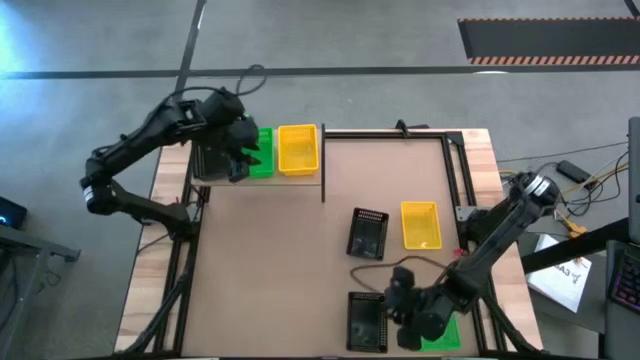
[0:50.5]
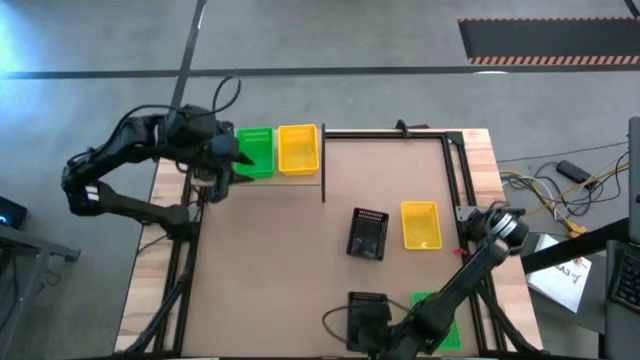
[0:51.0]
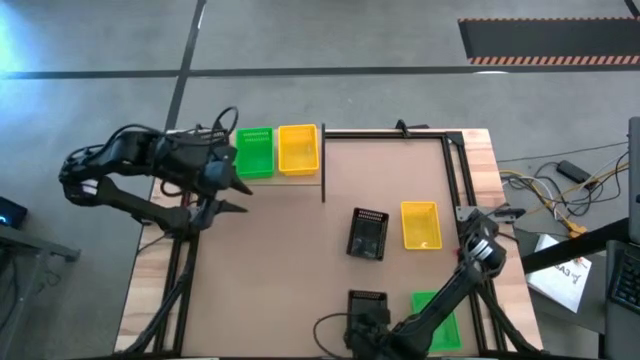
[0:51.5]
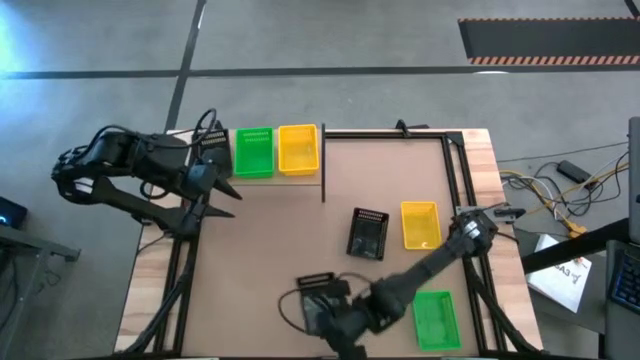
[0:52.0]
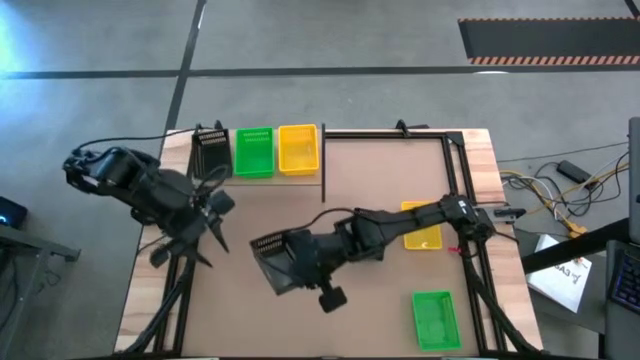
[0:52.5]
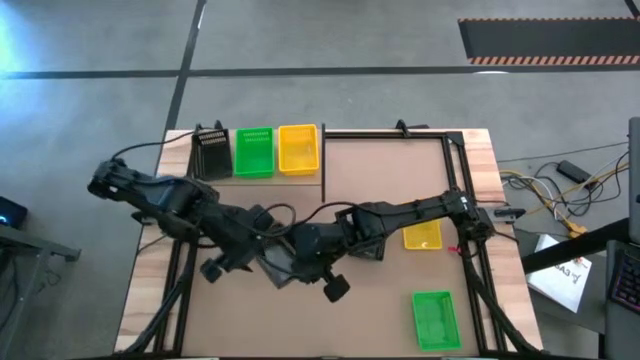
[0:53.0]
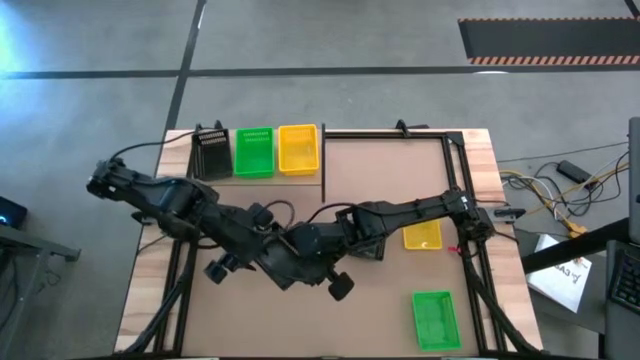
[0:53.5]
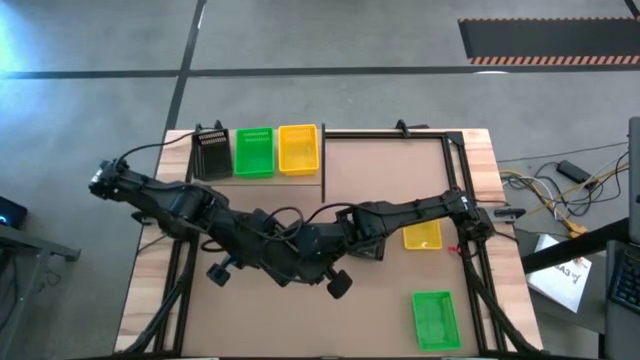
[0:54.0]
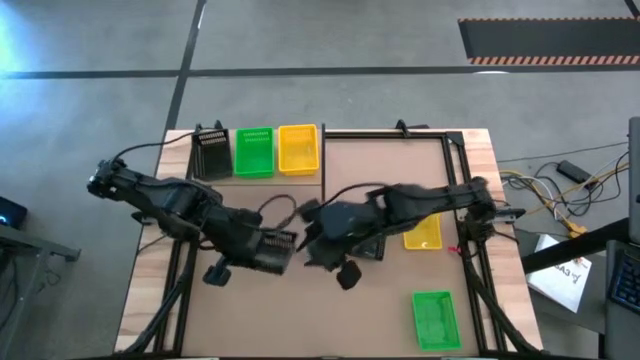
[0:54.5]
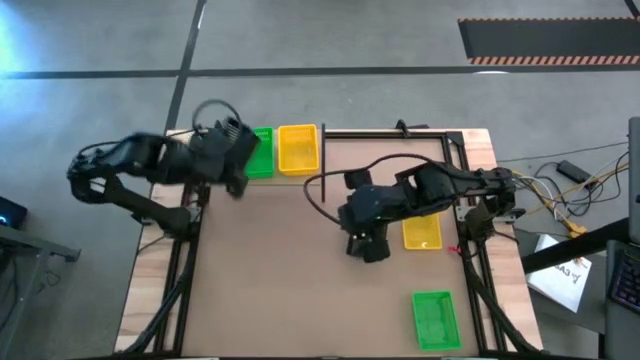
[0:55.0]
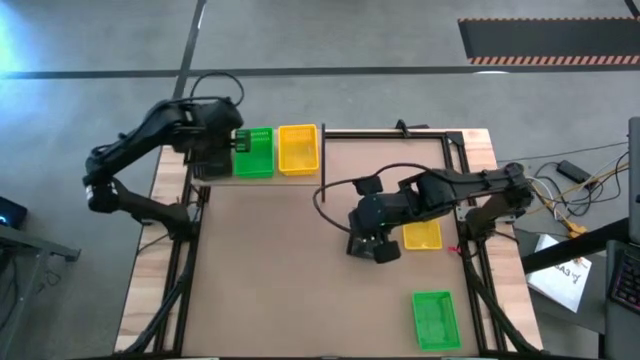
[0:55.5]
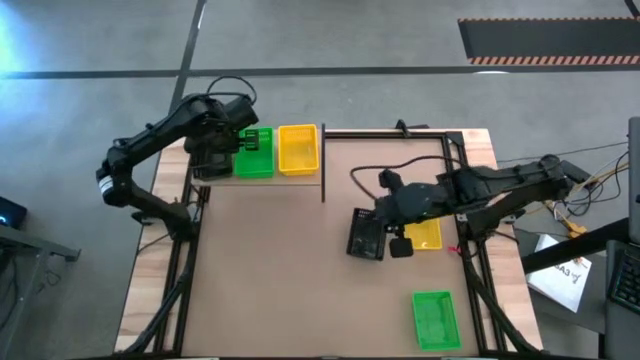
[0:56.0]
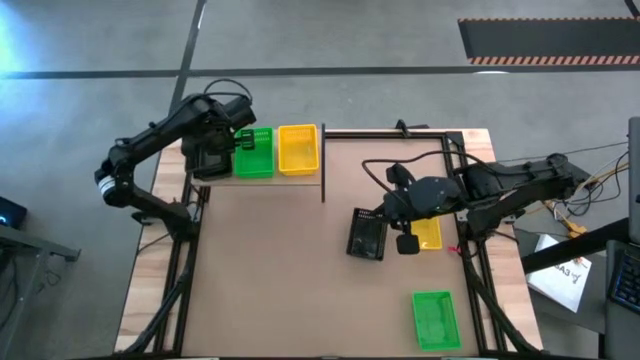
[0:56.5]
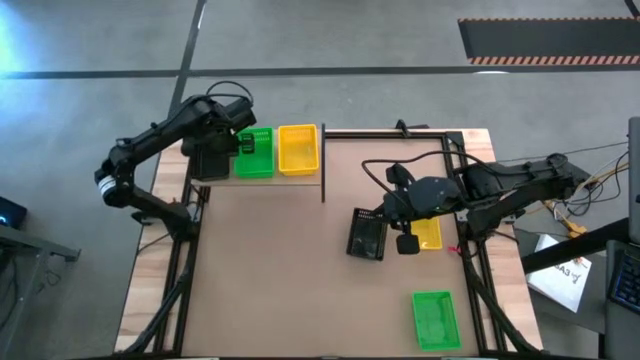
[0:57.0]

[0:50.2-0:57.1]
Task: Stack baskets on shelf by color
Stack the bottom black bin on top of the other black bin on the shelf

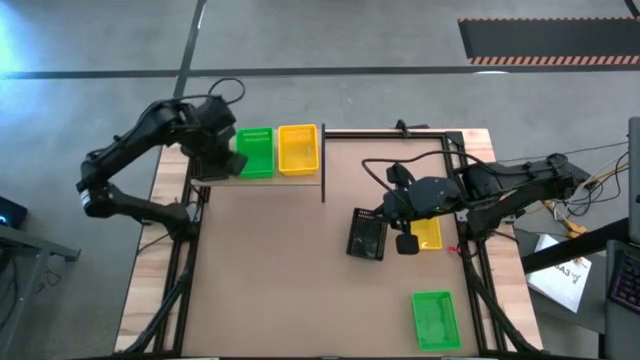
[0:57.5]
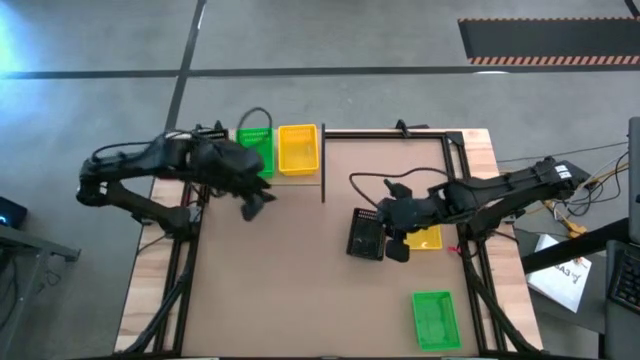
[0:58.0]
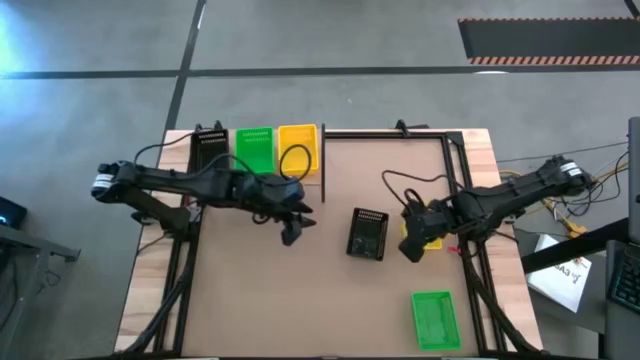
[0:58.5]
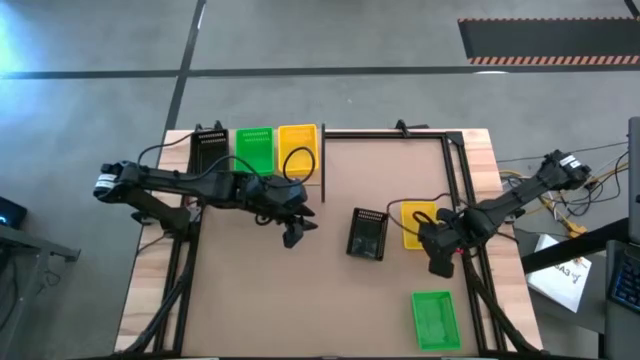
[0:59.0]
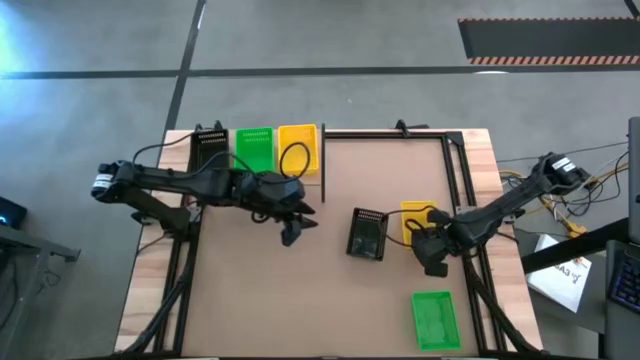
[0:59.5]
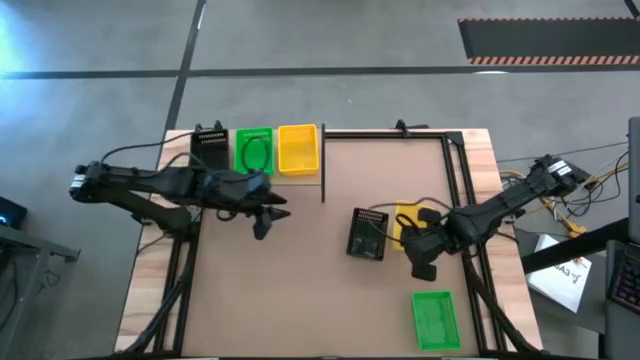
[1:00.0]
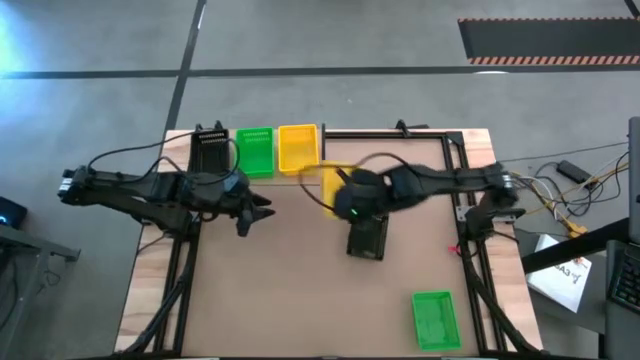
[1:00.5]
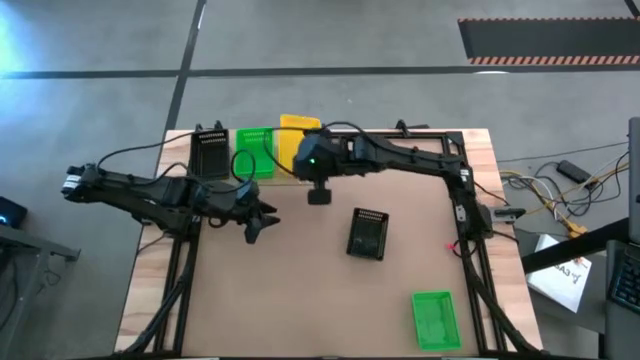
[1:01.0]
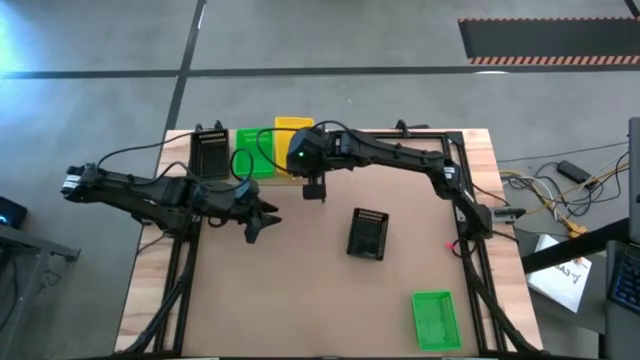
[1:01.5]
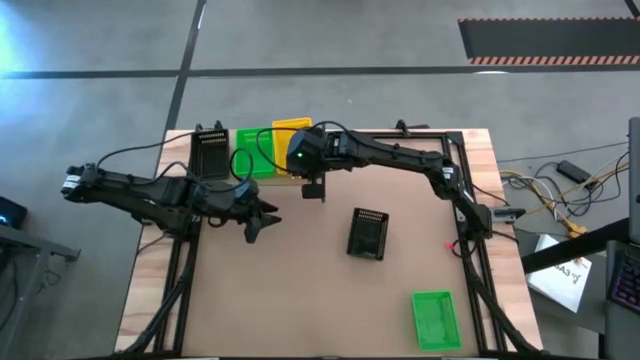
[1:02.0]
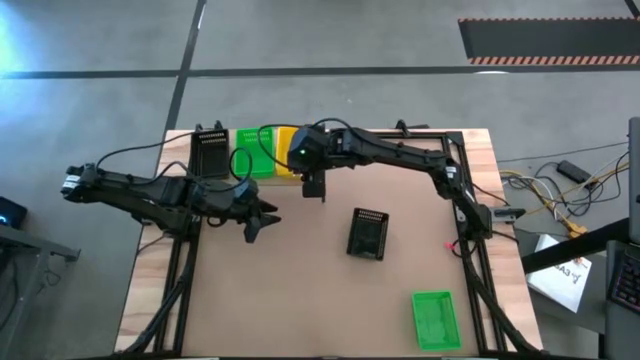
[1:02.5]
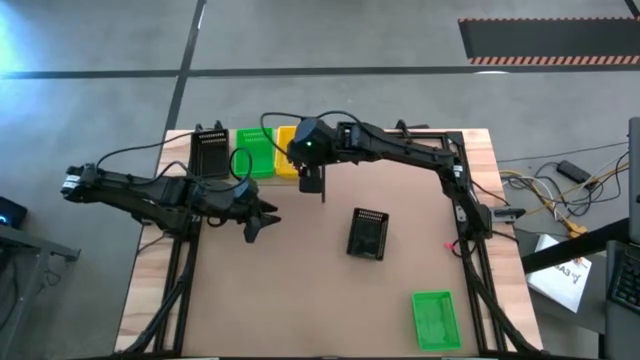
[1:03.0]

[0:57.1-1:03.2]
Stack the yellow bin on top of the other yellow bins on the shelf

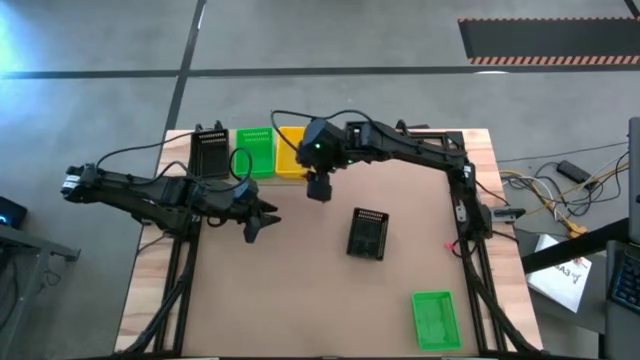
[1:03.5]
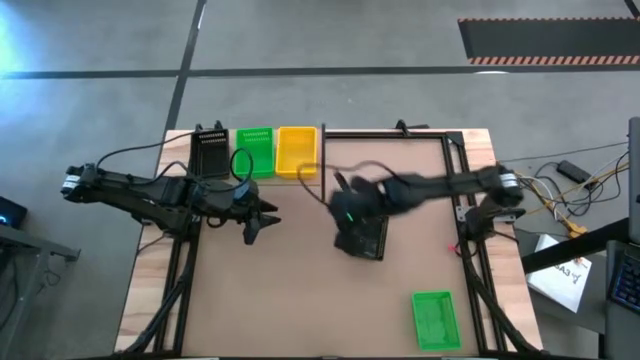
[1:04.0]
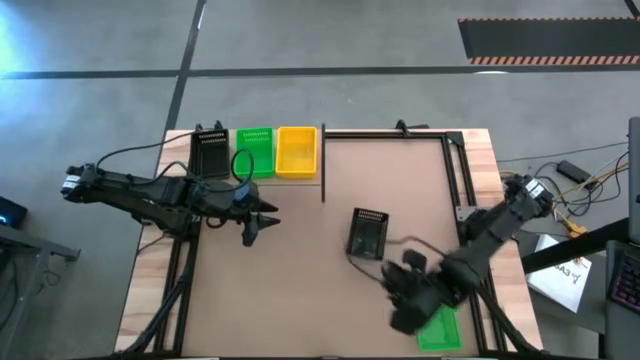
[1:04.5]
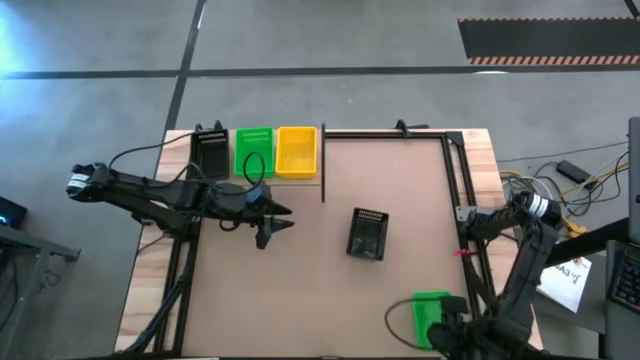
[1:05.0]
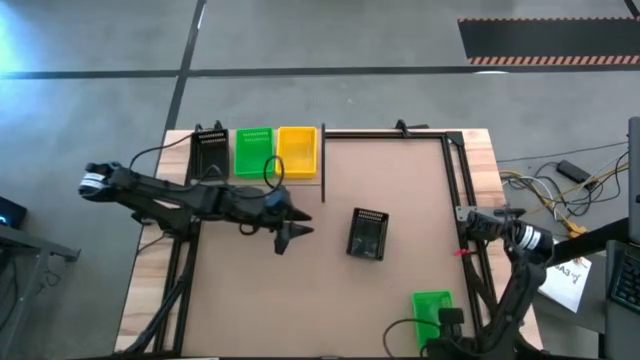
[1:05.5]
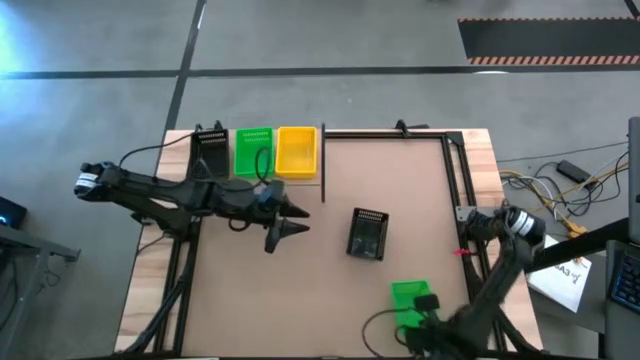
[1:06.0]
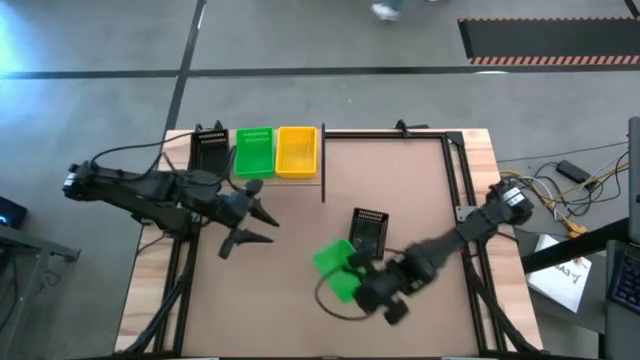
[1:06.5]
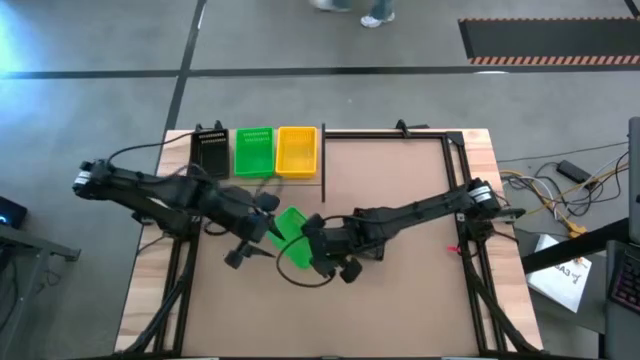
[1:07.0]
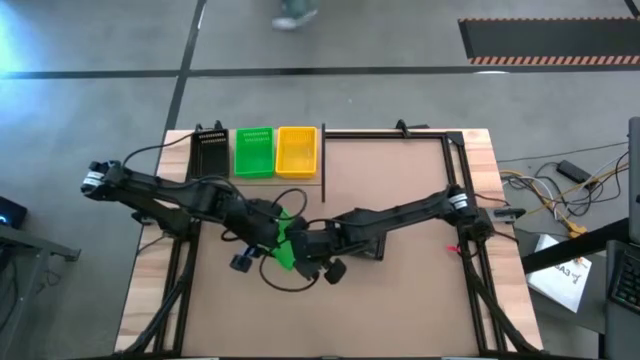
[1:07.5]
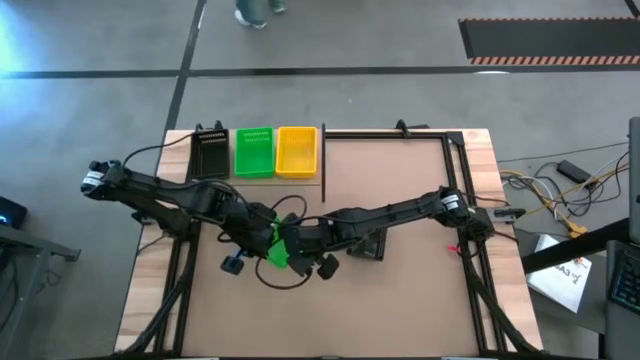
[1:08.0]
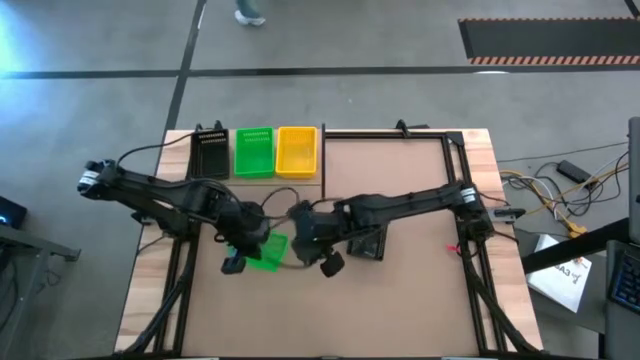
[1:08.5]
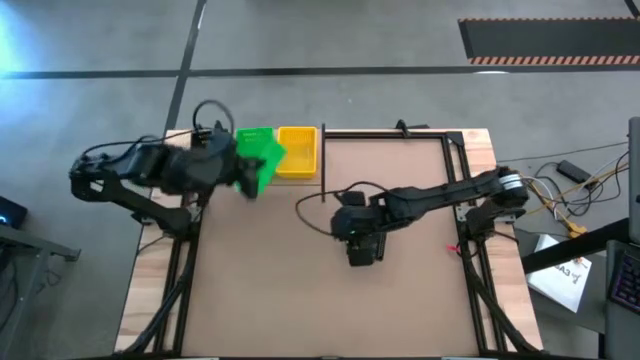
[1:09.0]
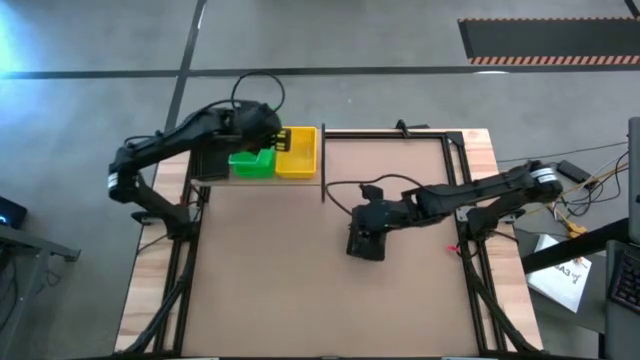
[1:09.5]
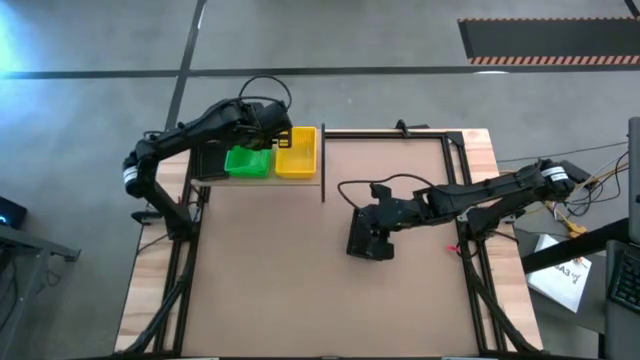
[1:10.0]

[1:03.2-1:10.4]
Stack the green bin on top of the other green bins on the shelf

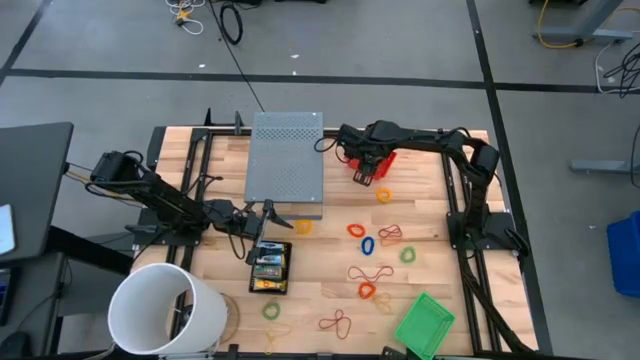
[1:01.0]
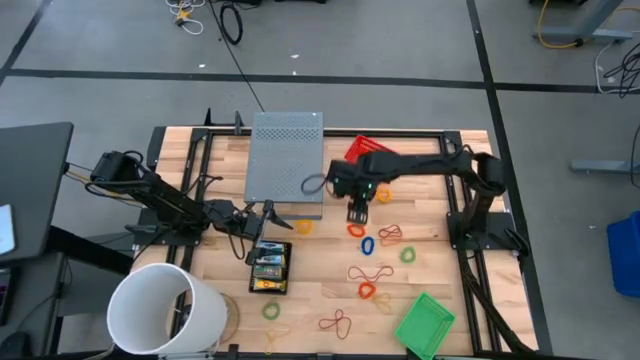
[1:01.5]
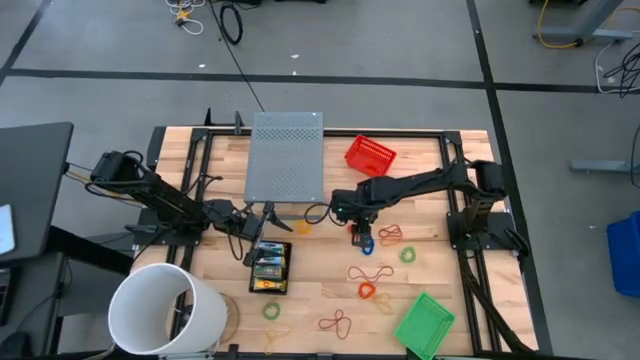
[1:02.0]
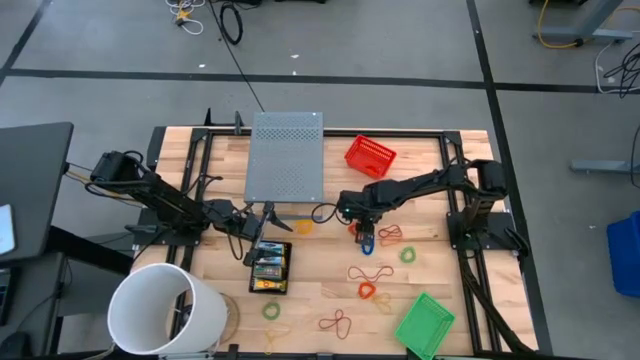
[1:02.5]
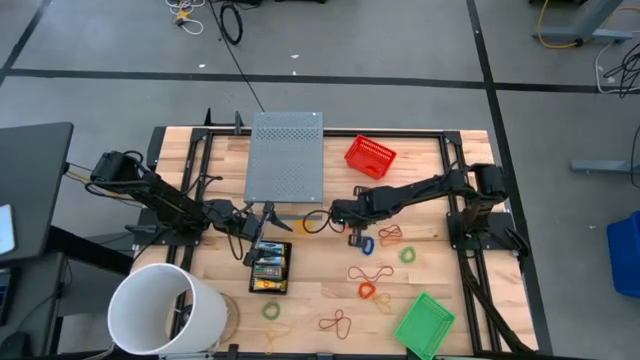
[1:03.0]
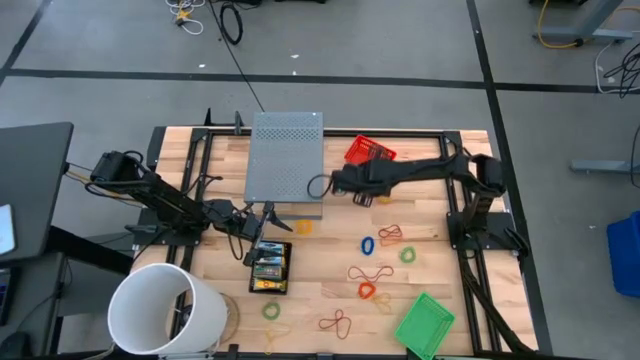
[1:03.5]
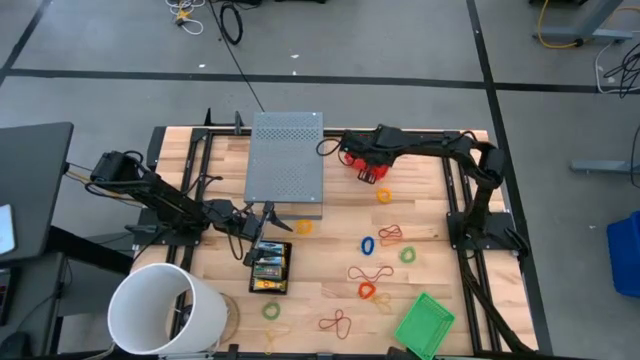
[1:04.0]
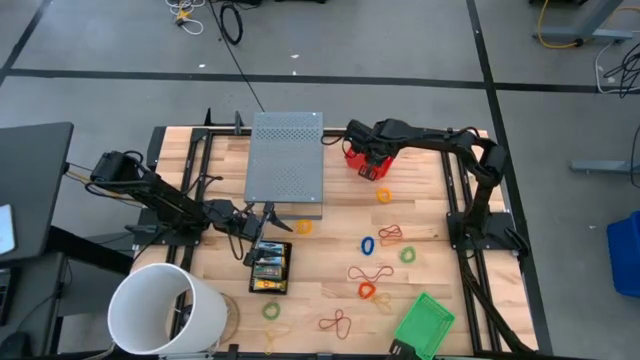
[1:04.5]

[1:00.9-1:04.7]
Task: Pick & Place Office Desk Supplies
Put the top orange spring keychain into the red basket
